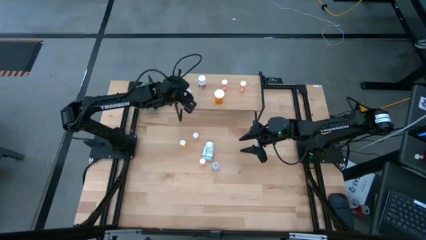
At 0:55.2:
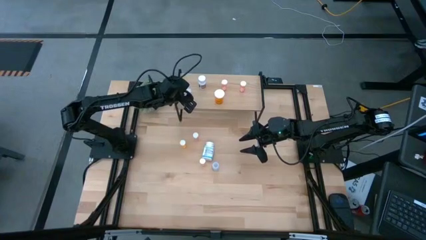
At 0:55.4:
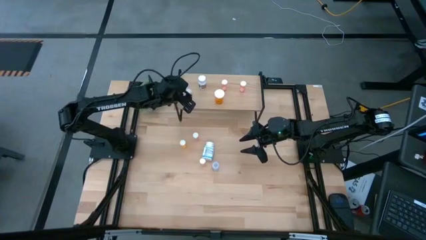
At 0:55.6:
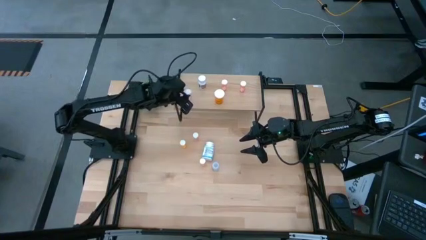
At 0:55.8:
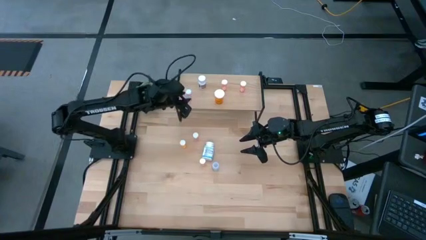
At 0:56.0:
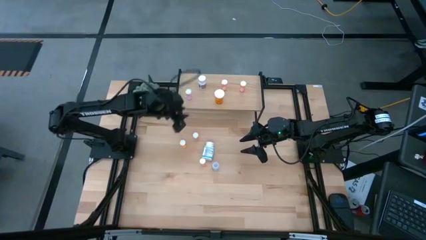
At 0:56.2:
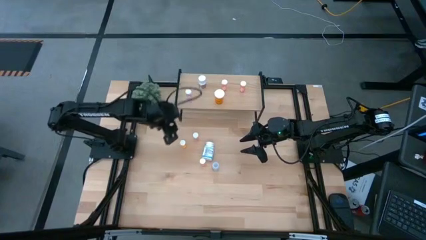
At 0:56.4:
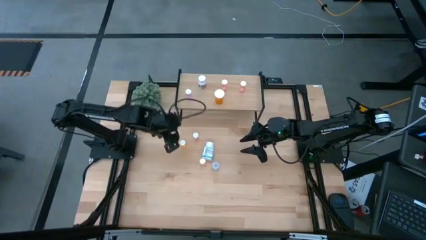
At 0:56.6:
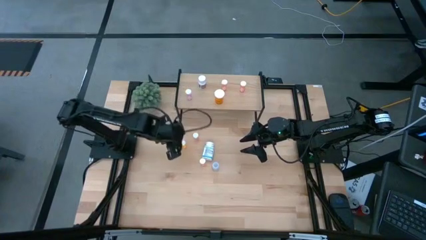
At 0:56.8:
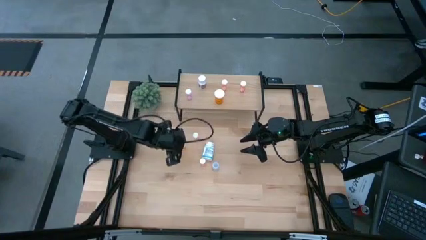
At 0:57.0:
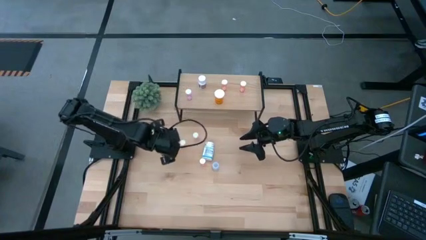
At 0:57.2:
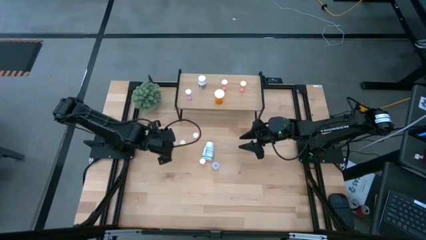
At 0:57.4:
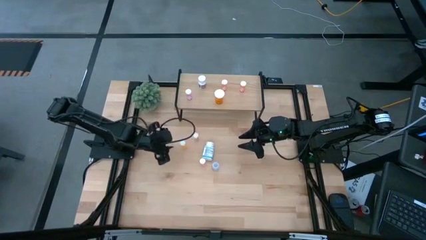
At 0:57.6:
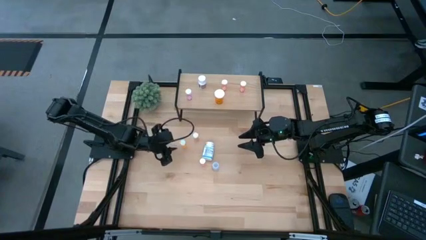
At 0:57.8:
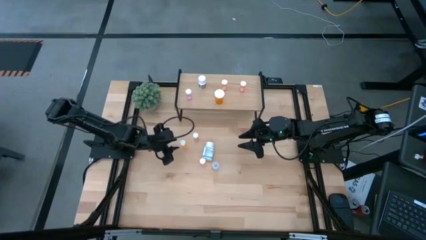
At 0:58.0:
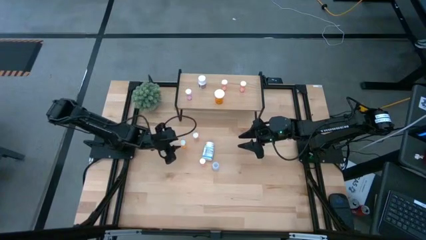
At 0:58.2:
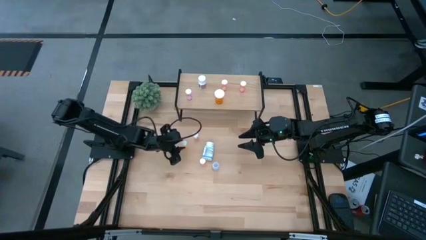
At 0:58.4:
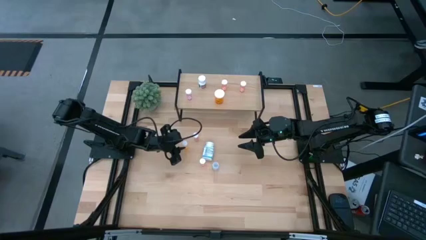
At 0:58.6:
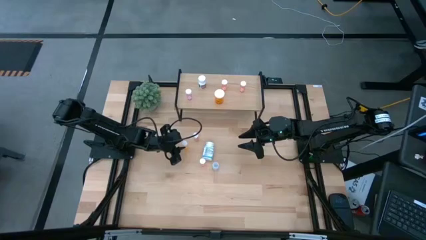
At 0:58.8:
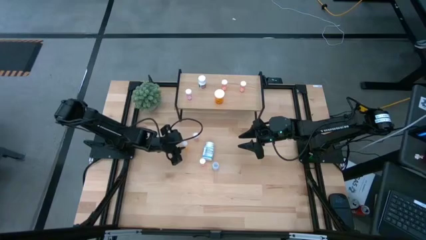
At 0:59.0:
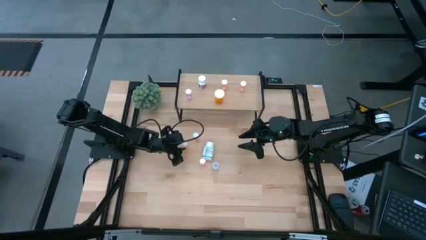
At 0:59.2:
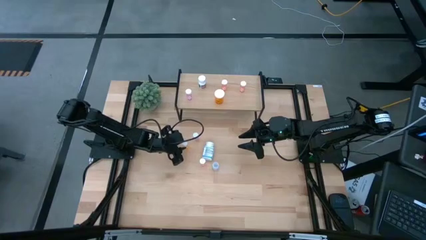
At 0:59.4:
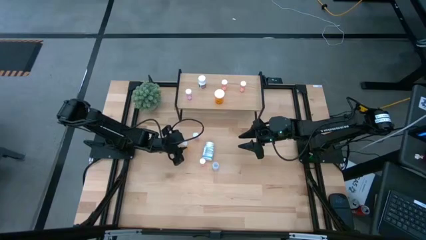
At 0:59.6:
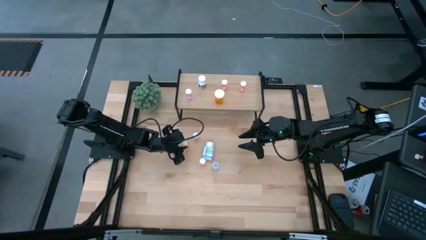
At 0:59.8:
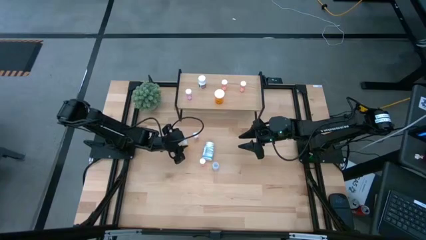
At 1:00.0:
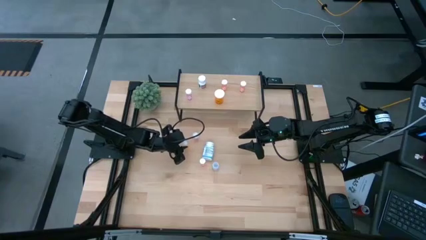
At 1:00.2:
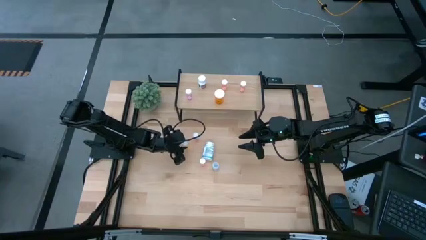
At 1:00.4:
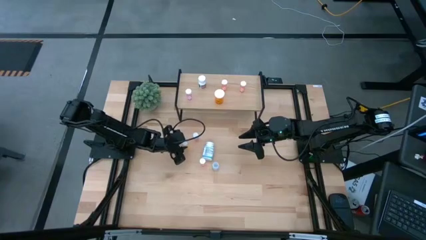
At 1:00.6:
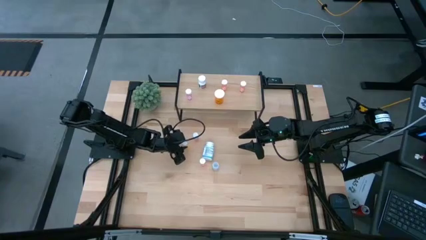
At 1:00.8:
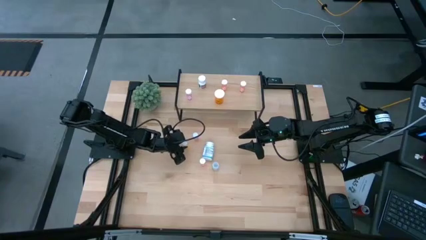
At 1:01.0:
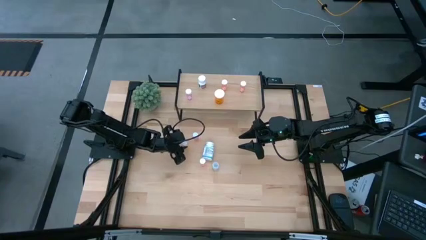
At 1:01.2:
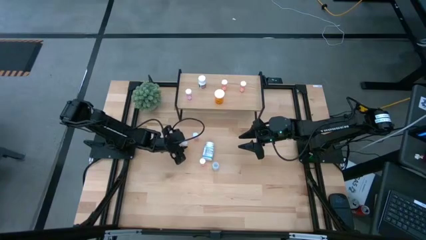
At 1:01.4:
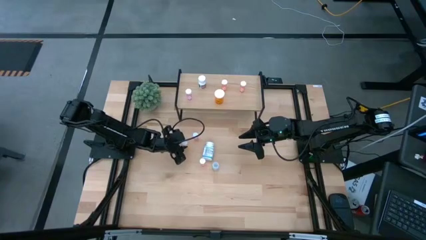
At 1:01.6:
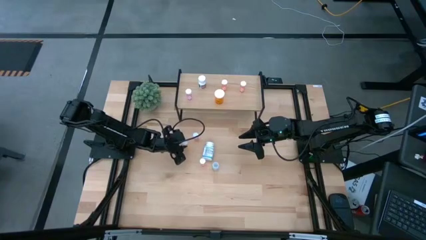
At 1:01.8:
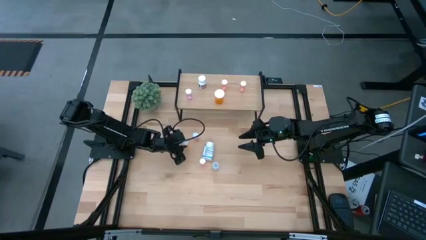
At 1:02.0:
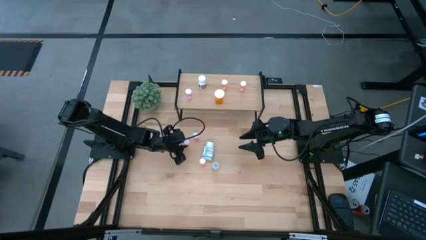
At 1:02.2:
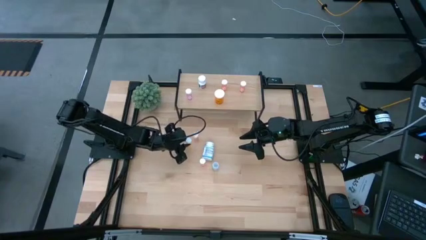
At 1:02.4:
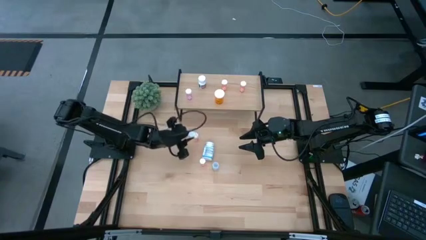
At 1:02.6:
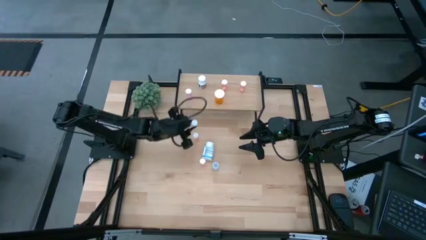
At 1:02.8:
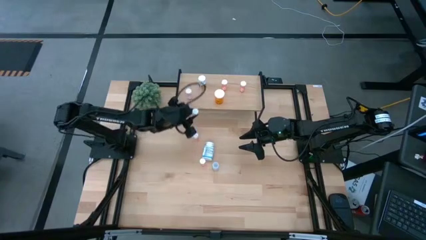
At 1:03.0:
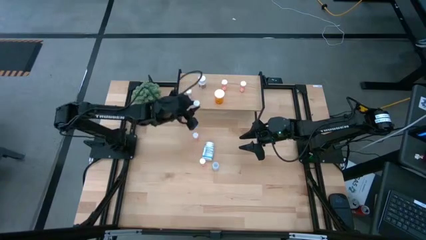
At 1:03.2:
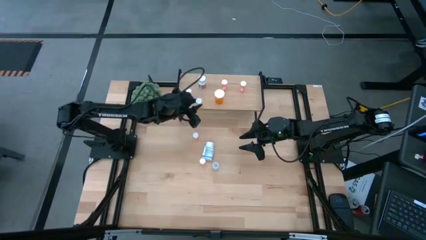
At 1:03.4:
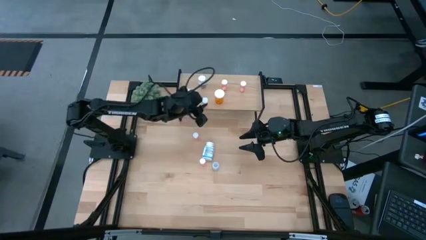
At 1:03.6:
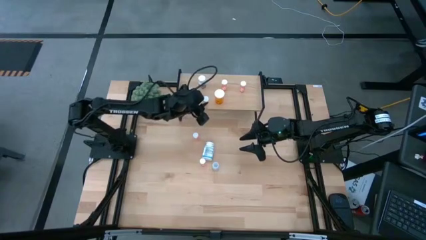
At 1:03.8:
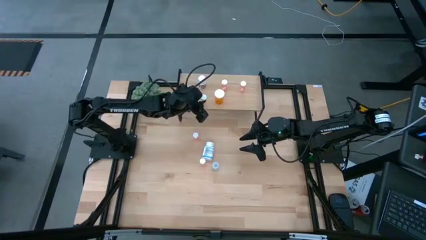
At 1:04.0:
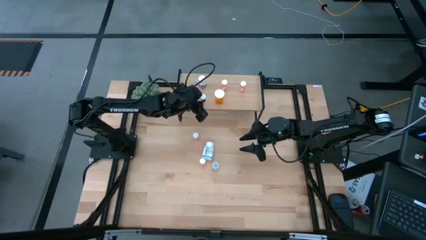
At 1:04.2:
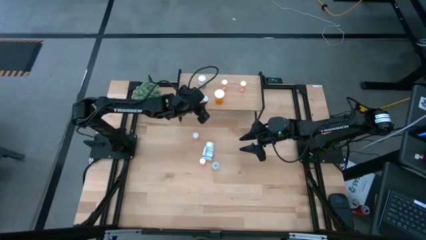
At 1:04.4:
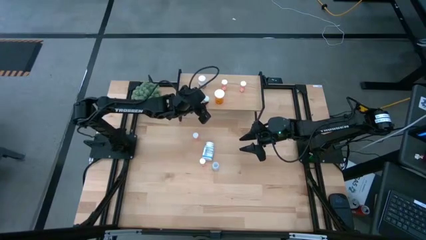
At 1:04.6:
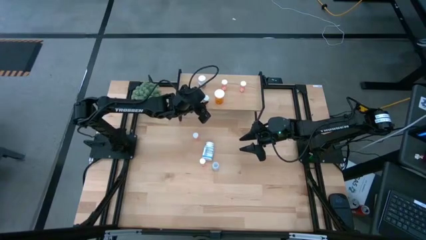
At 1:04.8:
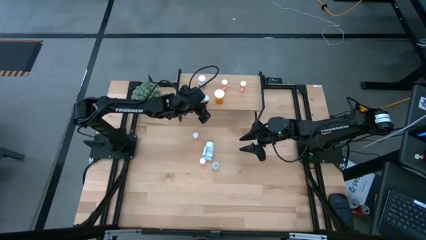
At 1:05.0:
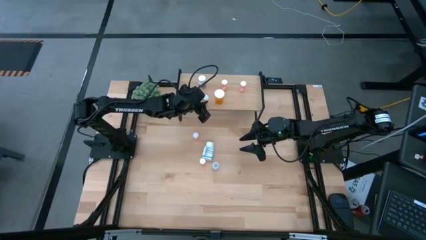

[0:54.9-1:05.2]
Task: Pick and place medicine bottles onto shelf by color
Put the small orange pill bottle on the shelf

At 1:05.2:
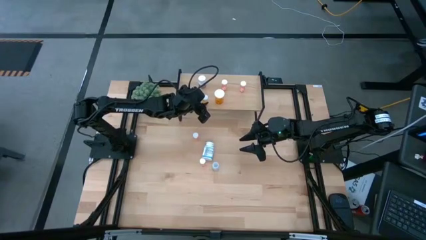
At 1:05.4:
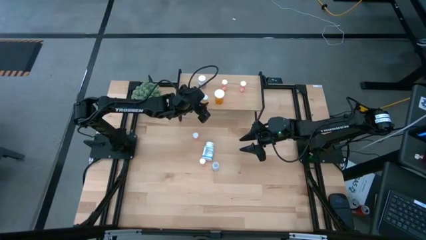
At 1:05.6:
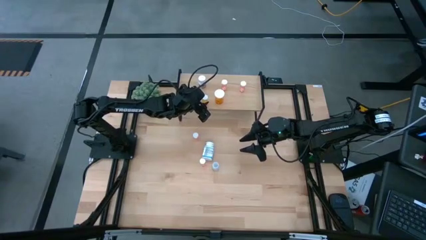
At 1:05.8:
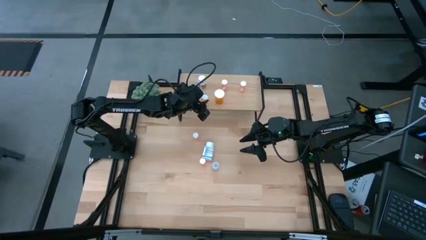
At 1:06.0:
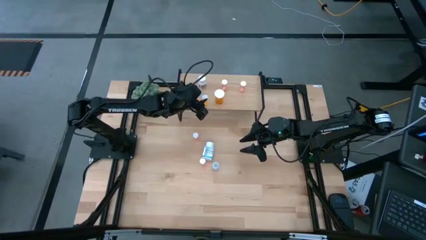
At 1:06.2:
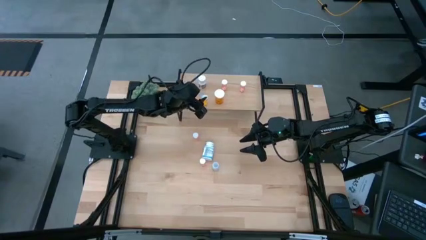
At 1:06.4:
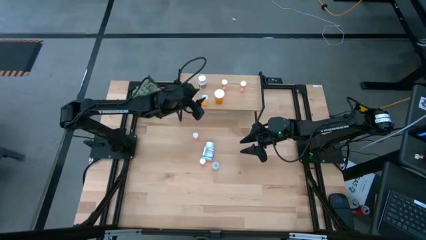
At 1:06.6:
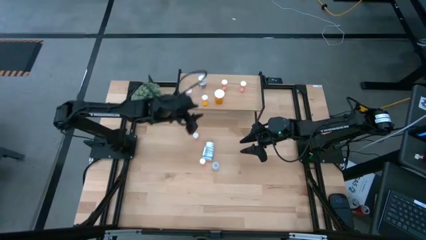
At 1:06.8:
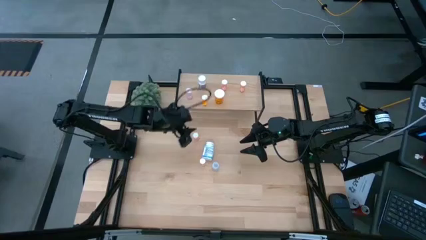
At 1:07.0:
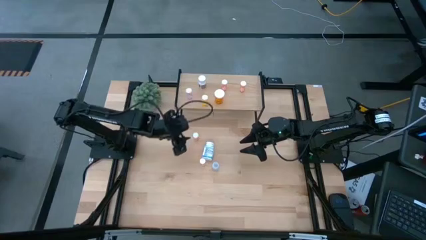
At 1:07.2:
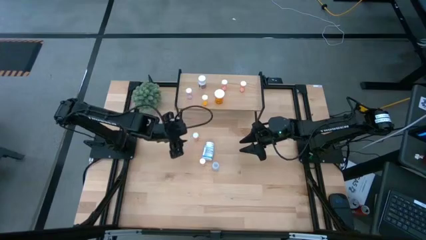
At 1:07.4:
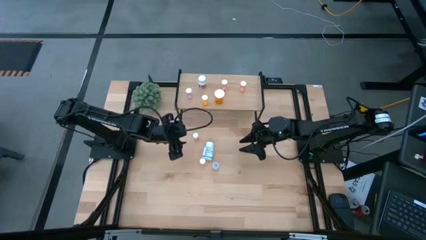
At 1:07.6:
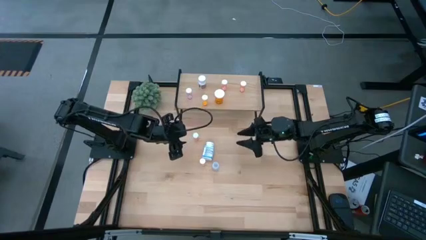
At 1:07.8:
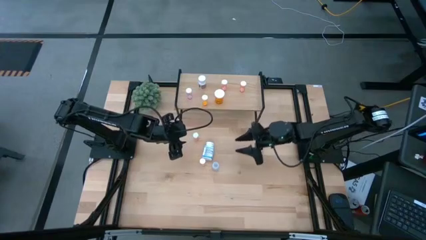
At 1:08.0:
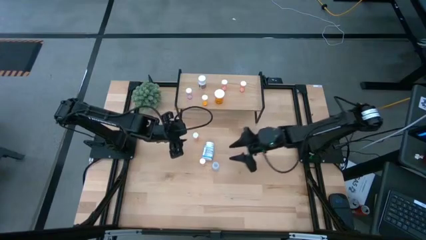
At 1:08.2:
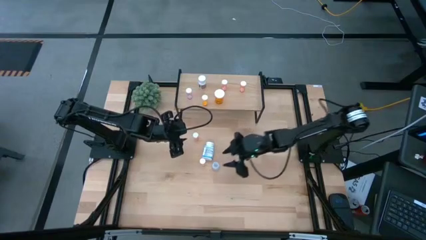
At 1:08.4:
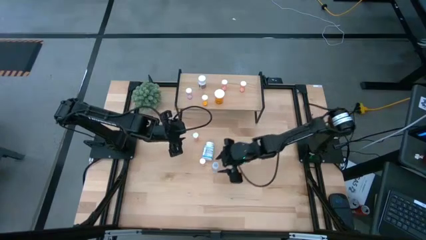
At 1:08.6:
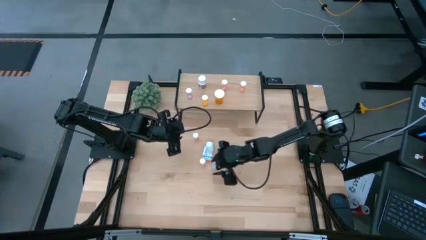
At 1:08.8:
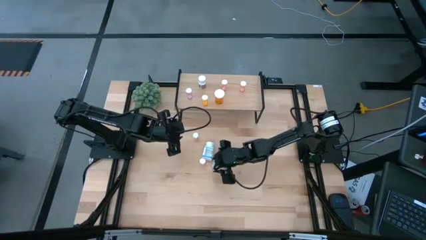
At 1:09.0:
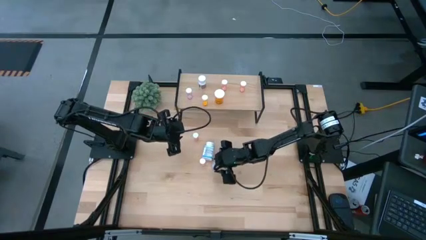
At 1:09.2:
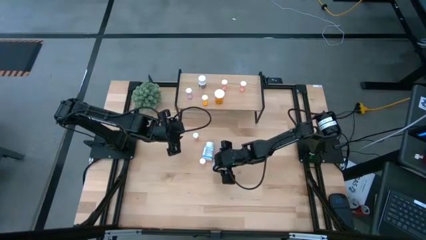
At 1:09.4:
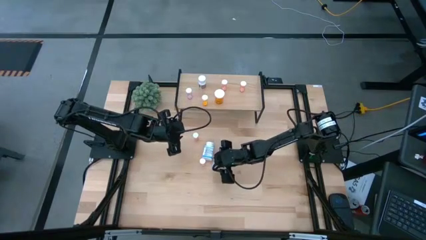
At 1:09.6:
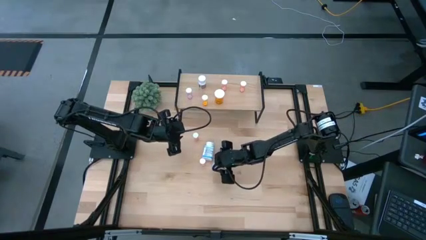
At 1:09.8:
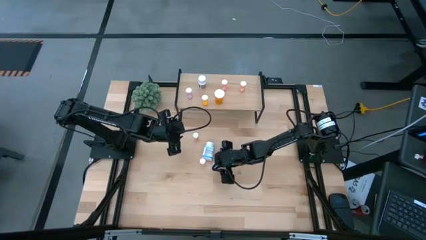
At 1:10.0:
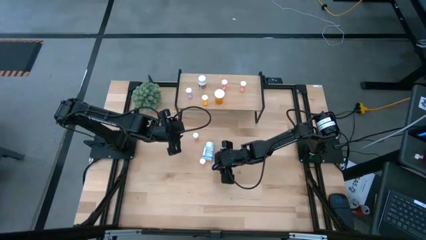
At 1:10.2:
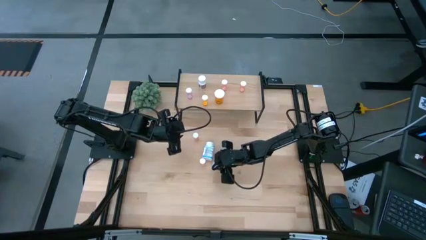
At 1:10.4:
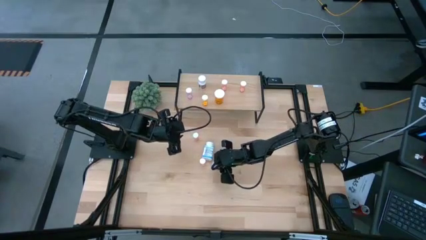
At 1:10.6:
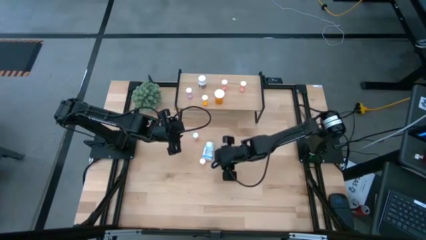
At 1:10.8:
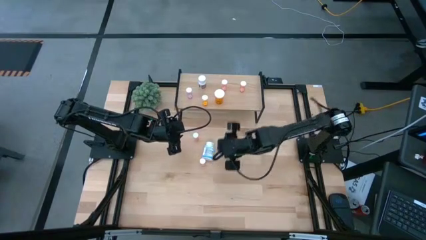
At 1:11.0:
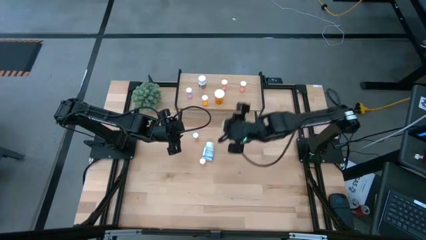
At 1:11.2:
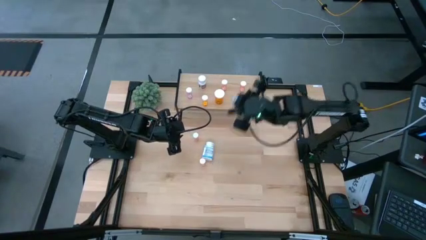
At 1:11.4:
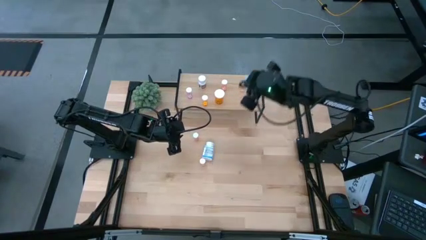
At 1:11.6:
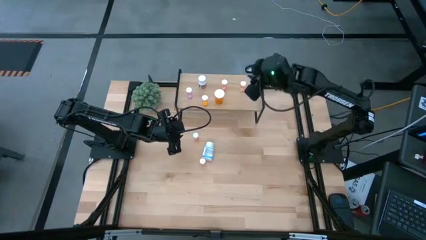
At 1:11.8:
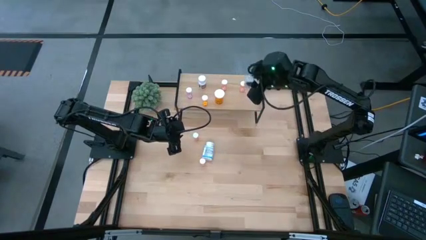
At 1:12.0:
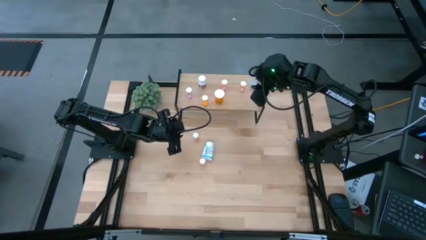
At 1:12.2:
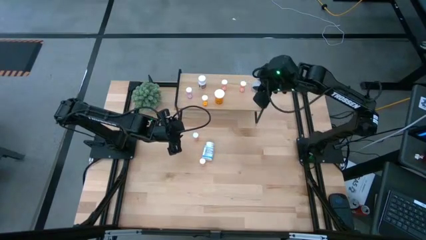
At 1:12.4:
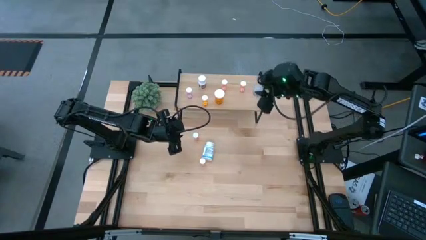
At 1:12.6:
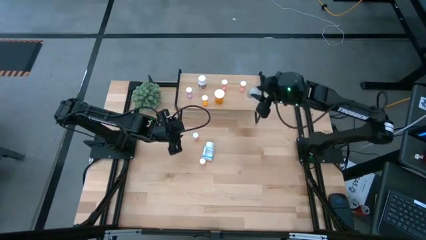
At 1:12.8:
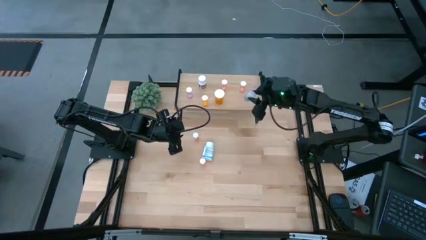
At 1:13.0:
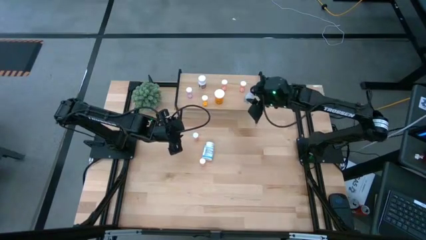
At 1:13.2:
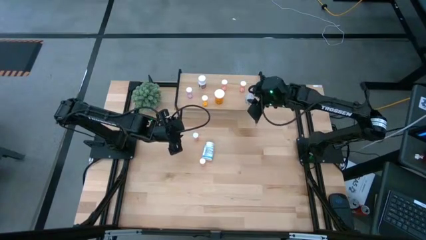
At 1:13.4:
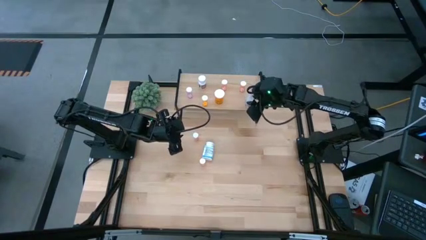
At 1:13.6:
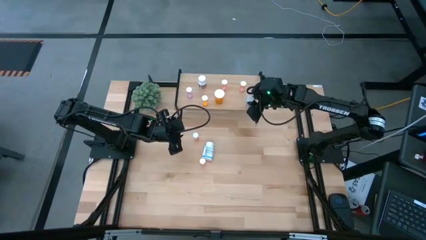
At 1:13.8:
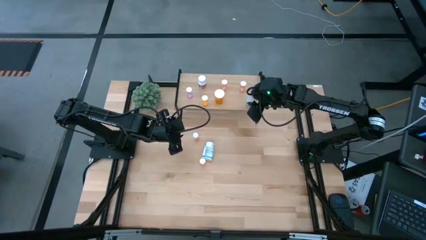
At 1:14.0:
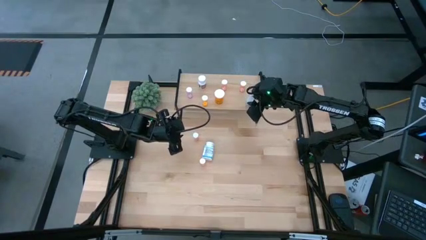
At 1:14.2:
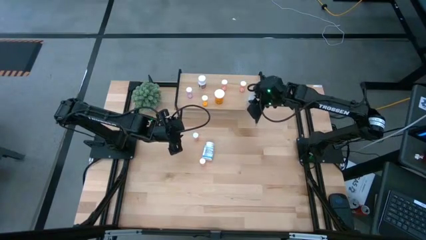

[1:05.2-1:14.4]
Put the transparent pill bottle on the shelf
